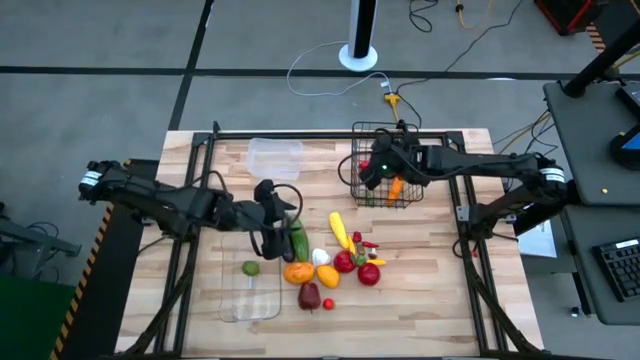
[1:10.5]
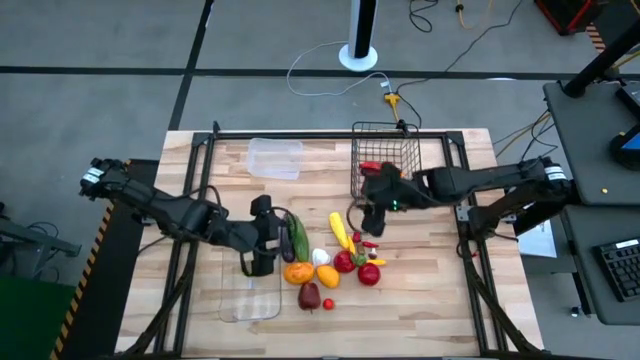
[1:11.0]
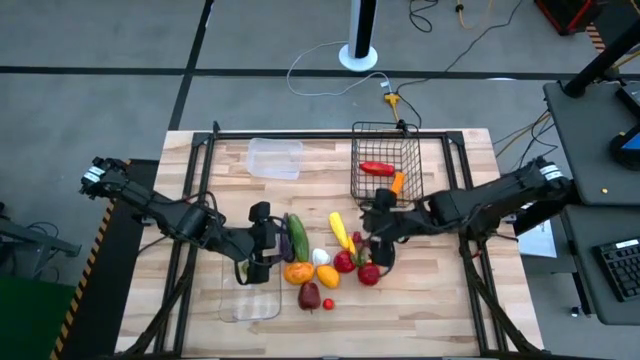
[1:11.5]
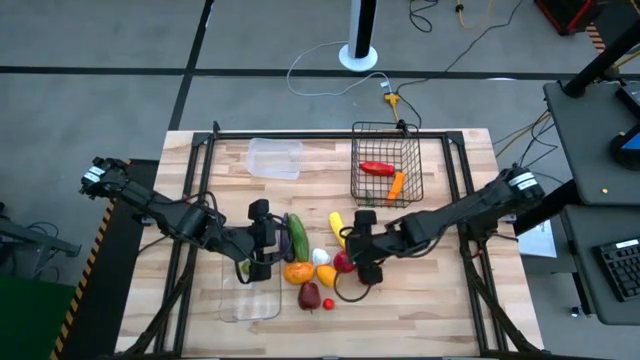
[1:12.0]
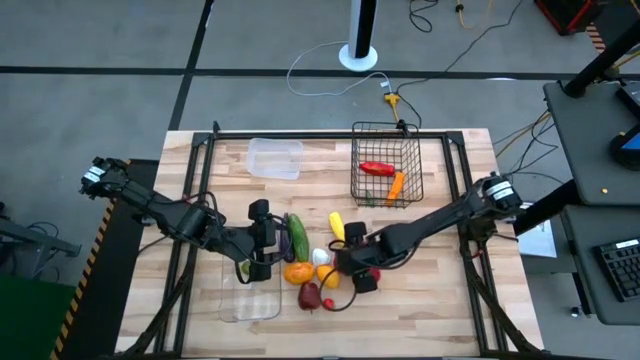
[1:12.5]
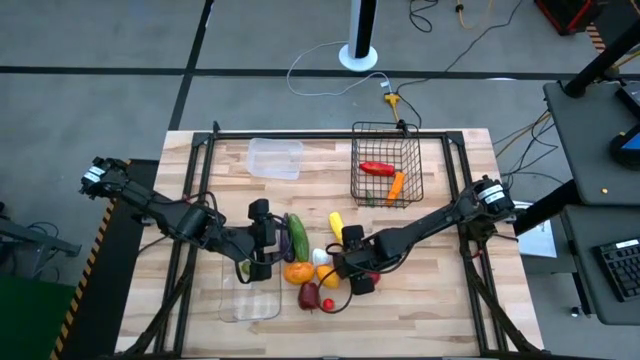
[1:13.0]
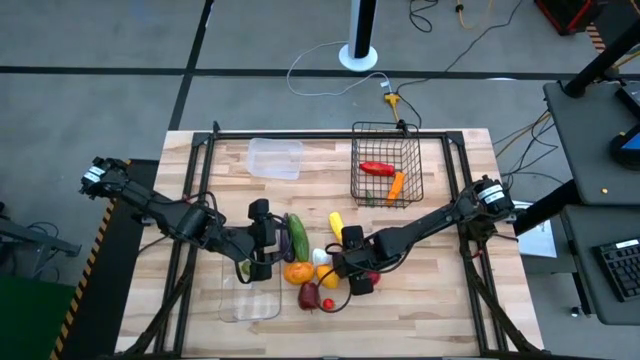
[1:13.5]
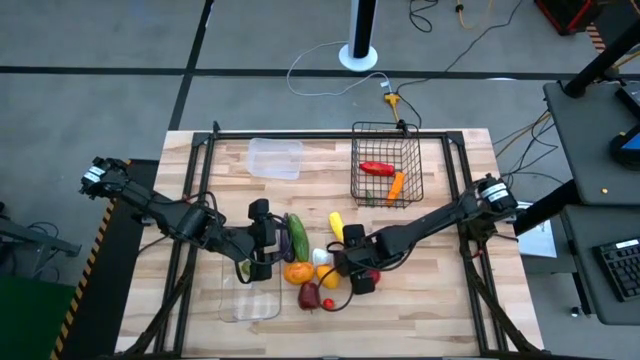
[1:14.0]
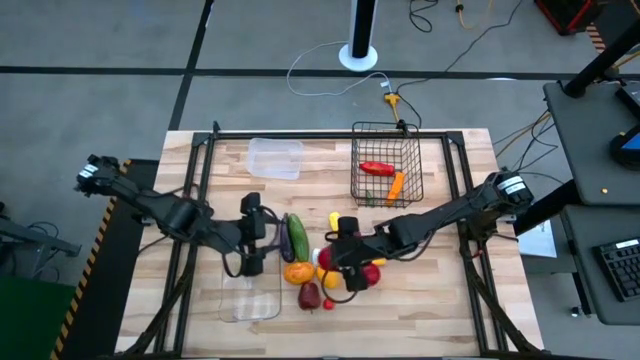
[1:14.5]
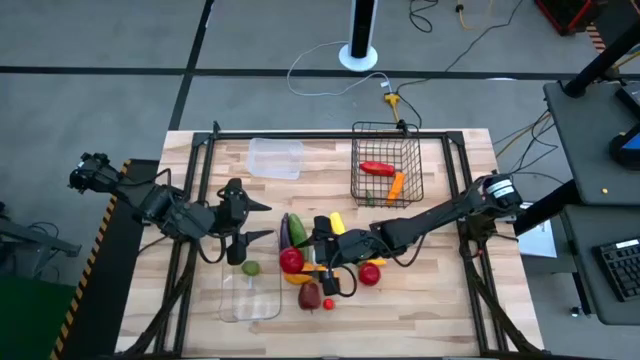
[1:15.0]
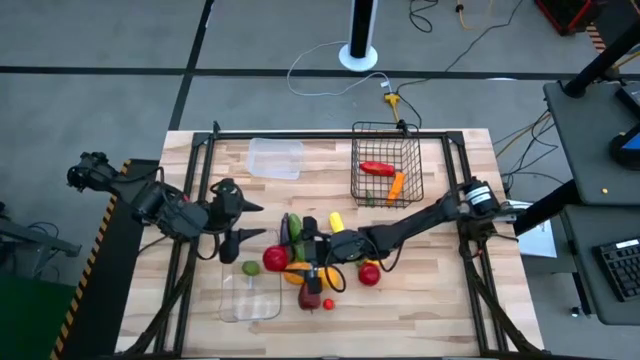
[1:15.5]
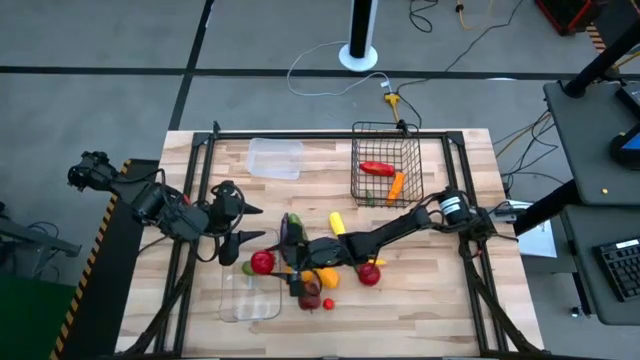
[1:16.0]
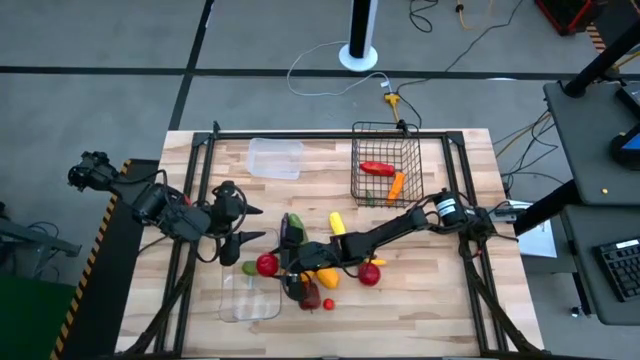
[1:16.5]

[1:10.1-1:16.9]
Task: Sort produce into baskets
Put the left red tomato into the transparent bin

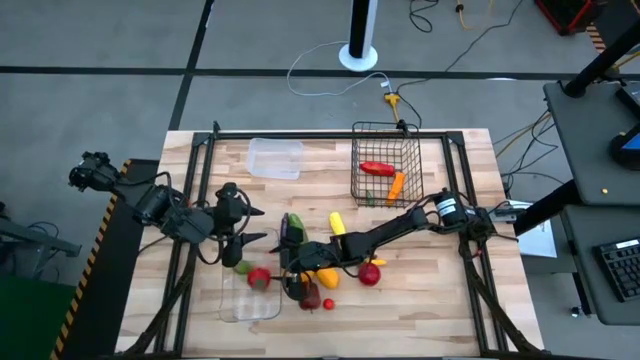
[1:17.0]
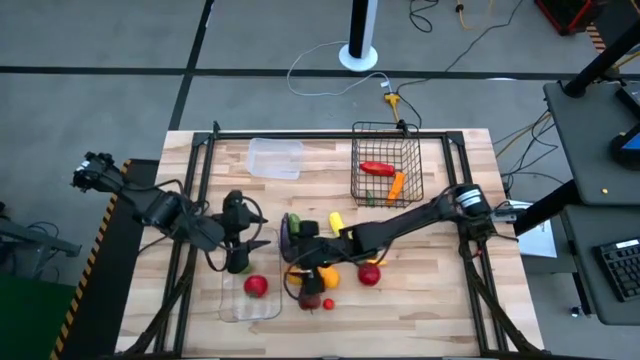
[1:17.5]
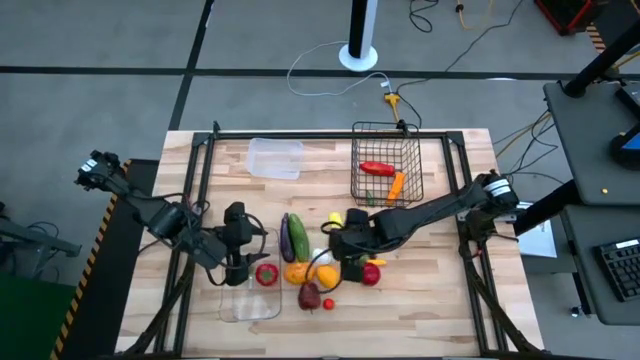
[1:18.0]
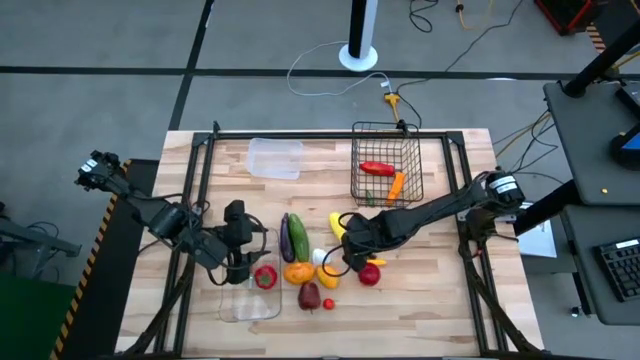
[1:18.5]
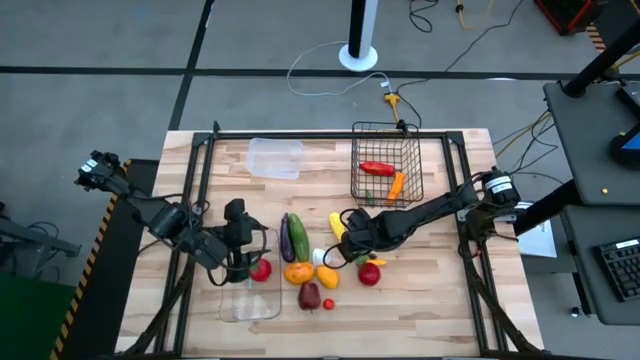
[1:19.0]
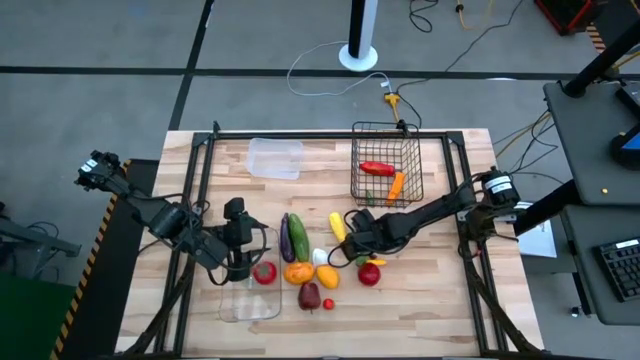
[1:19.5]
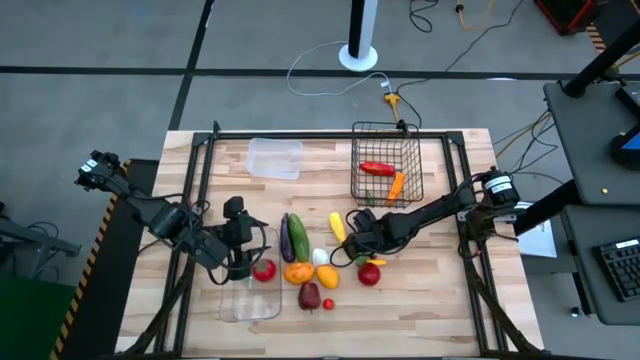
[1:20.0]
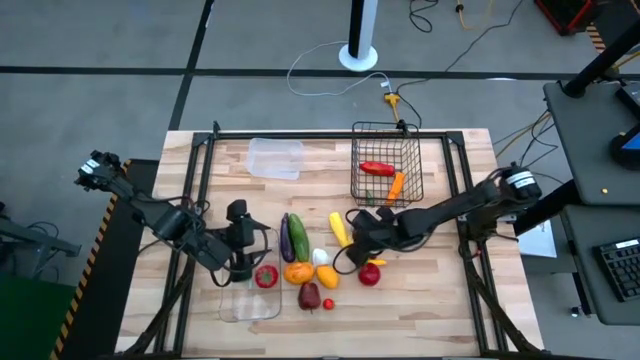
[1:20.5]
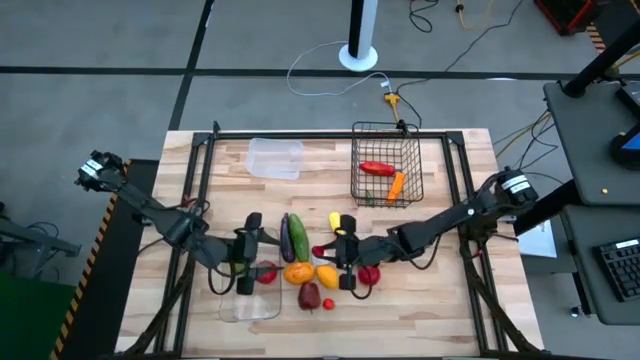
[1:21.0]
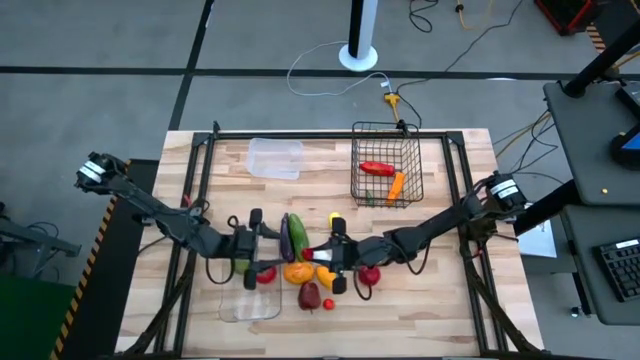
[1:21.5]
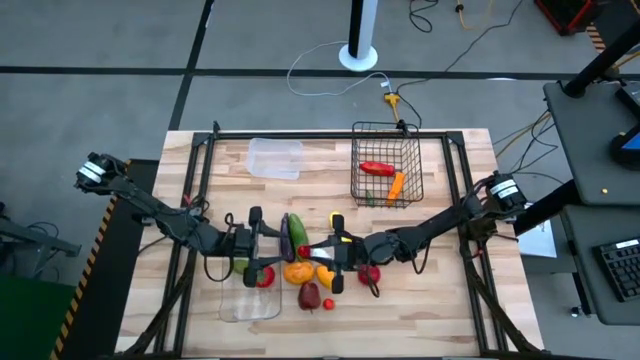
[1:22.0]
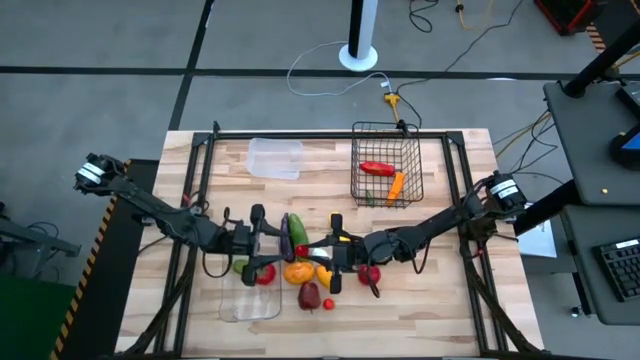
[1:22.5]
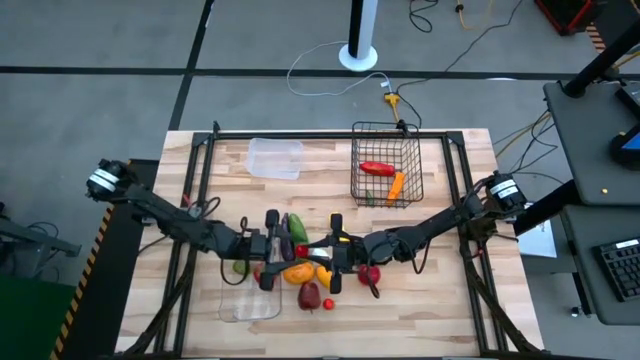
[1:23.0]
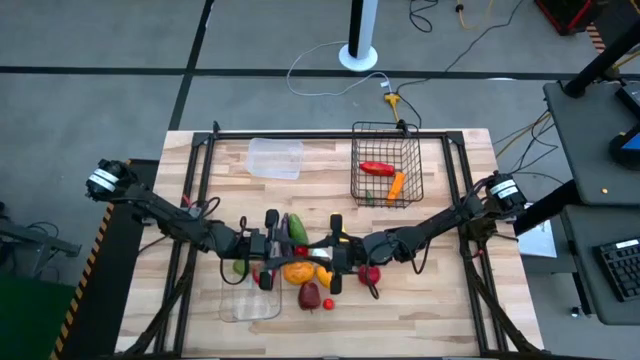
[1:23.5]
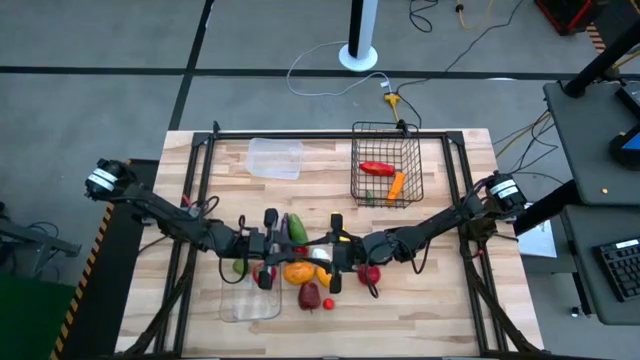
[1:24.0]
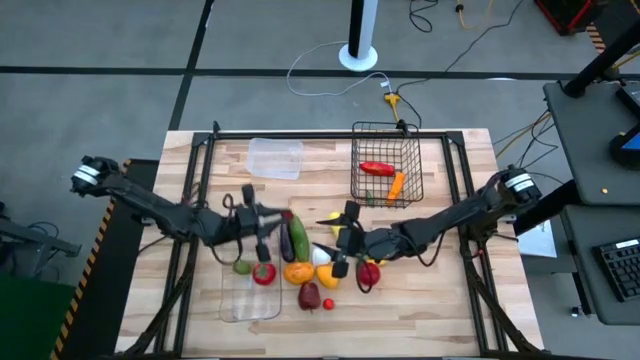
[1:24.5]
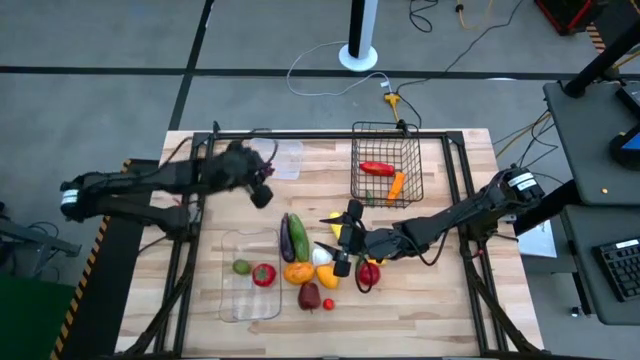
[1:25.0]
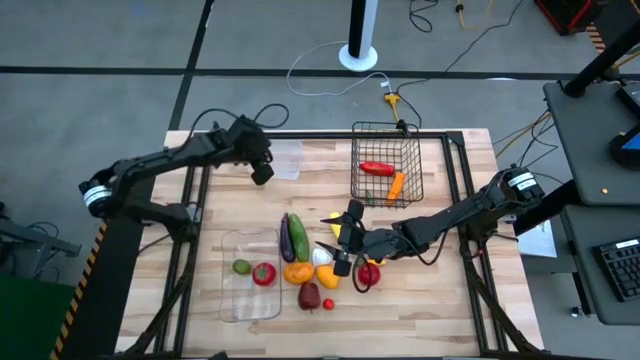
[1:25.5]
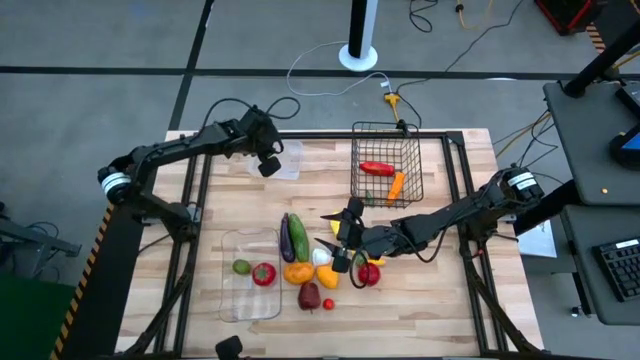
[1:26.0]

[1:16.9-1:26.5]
Put the small red bell pepper into the white bin

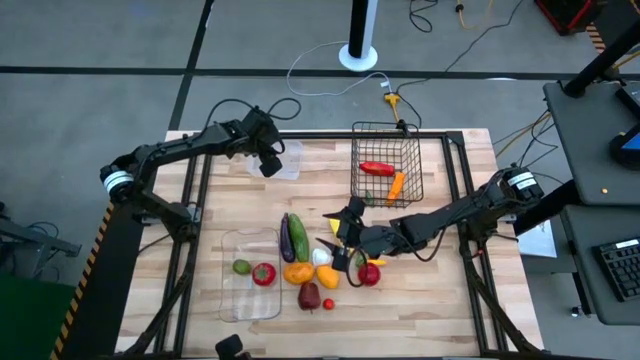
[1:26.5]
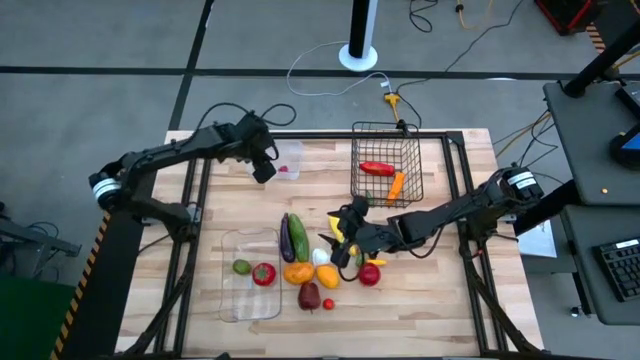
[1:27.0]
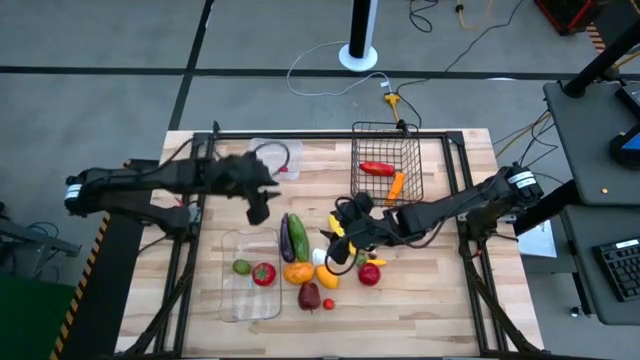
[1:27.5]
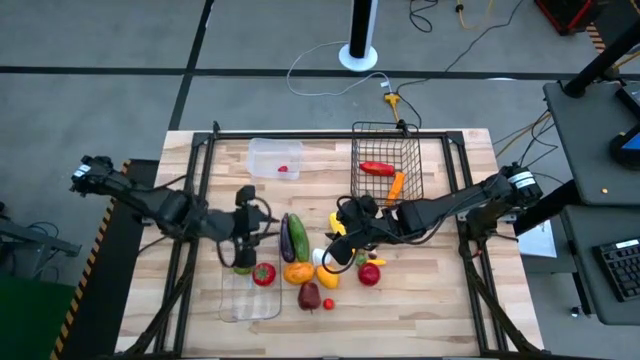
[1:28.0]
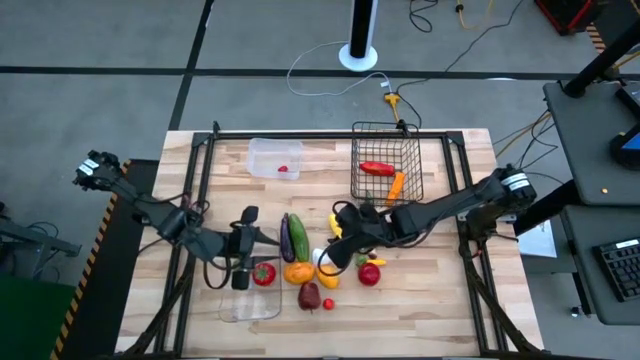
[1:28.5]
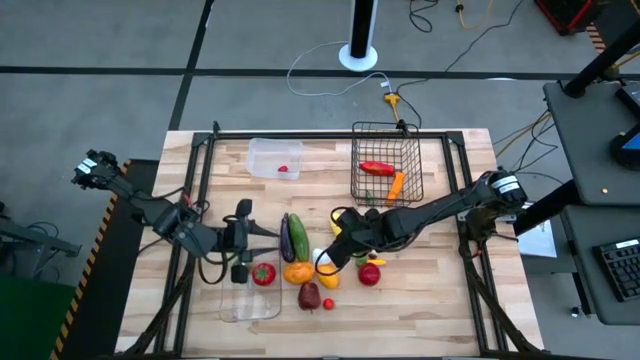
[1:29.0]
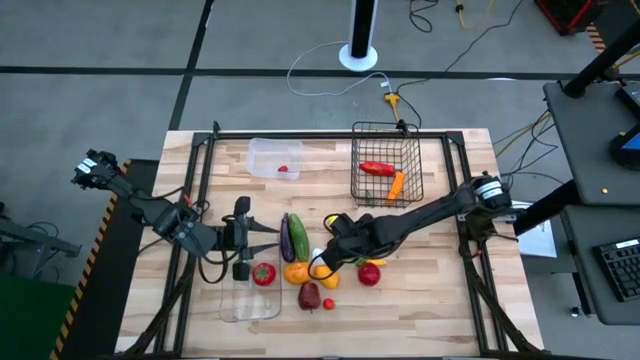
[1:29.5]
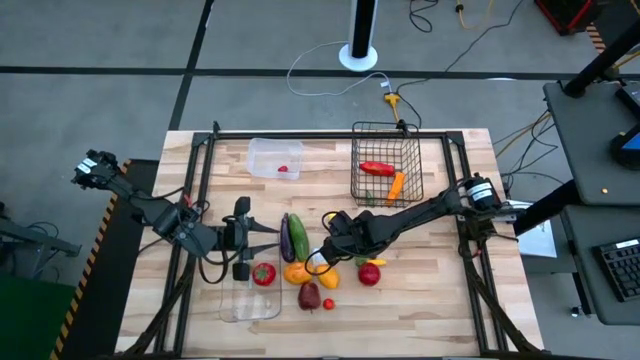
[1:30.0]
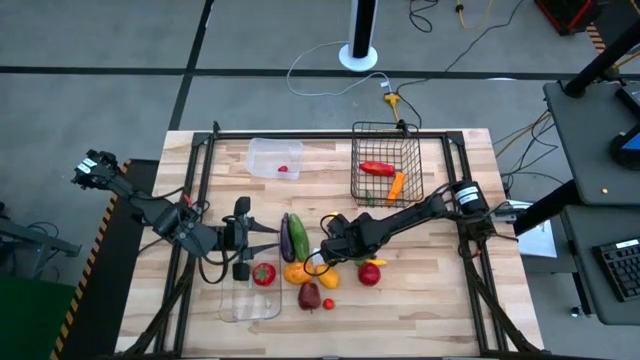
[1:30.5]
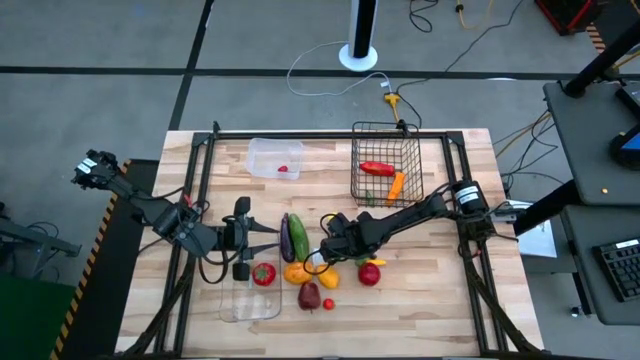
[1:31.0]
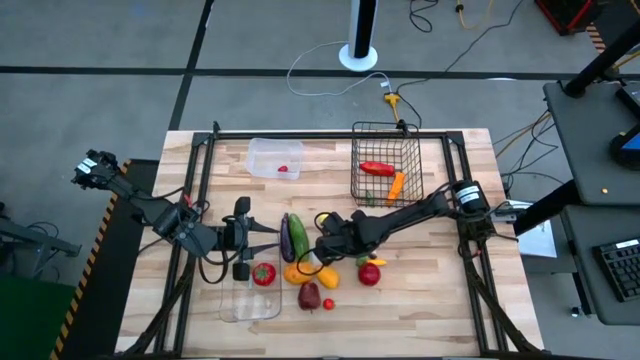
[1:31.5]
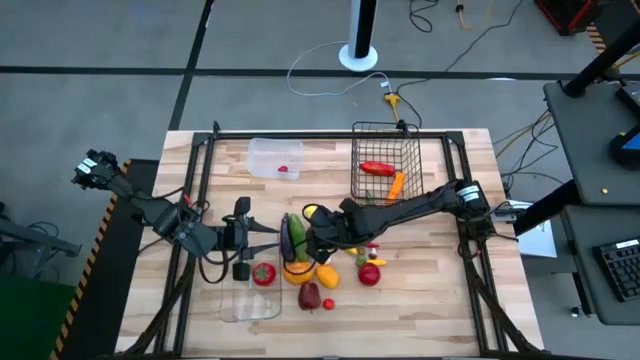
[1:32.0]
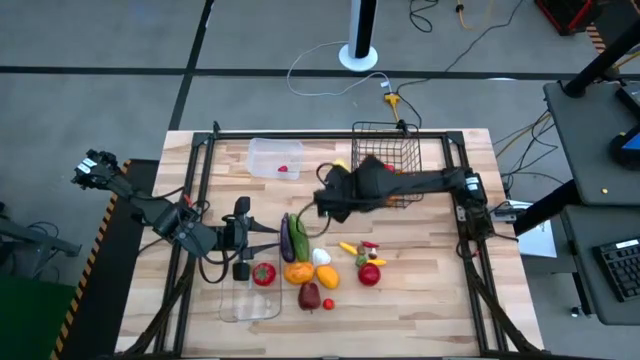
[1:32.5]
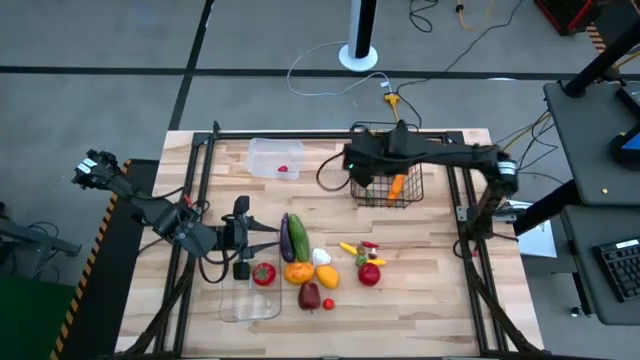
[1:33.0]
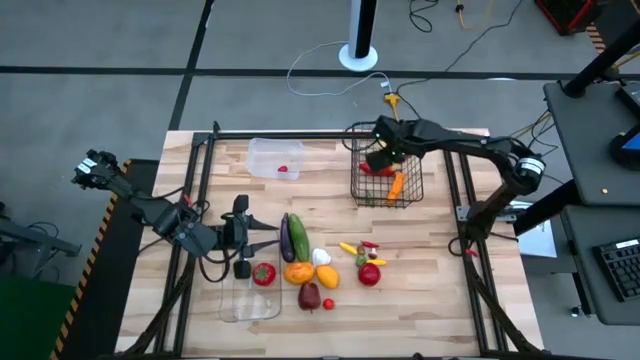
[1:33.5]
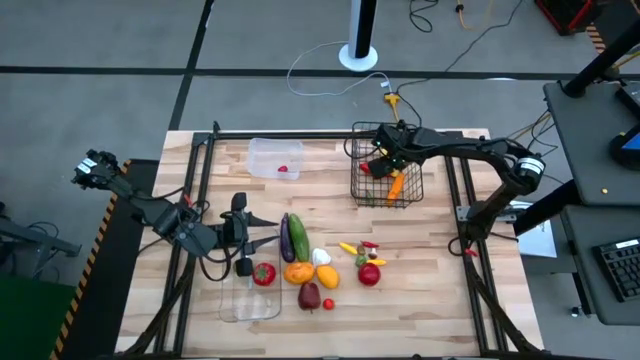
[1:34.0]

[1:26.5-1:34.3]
Put the yellow corn into the wire basket
